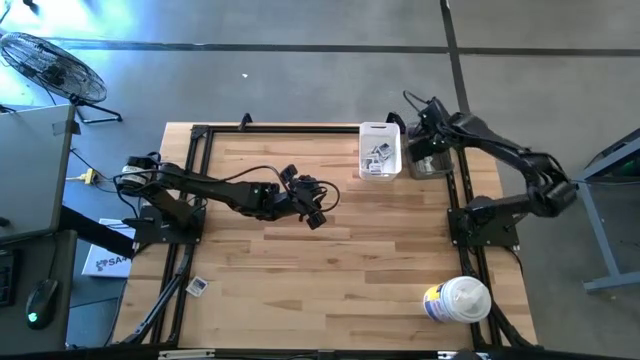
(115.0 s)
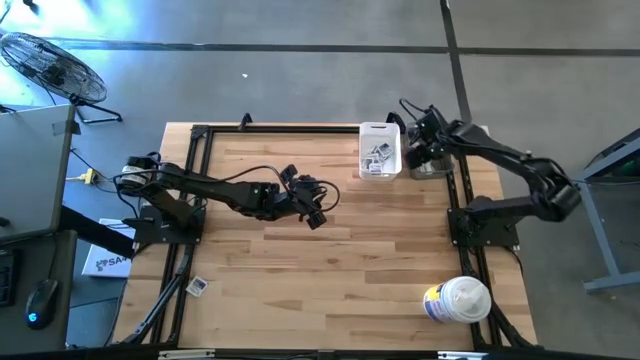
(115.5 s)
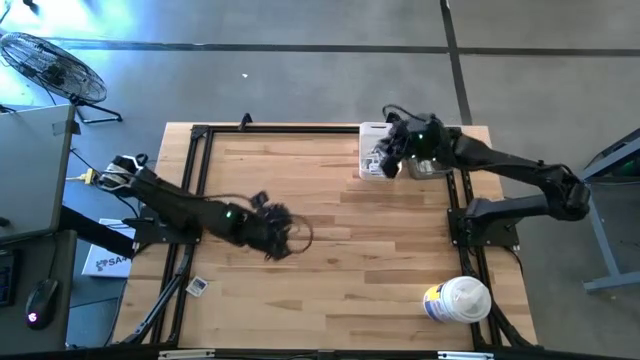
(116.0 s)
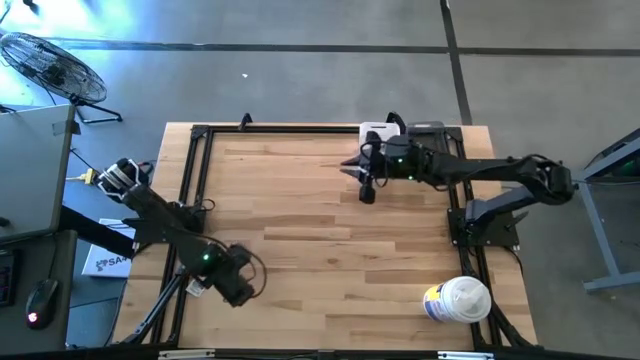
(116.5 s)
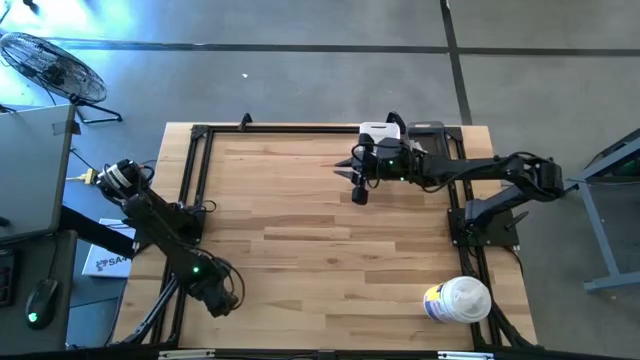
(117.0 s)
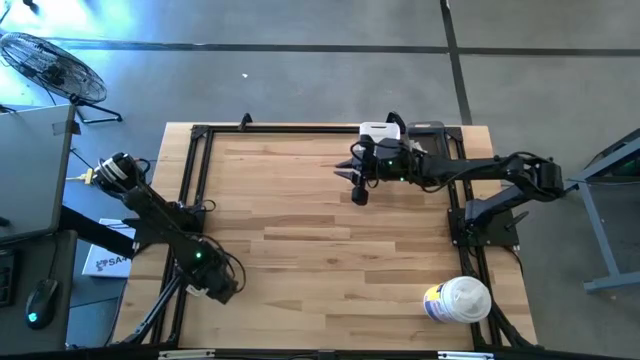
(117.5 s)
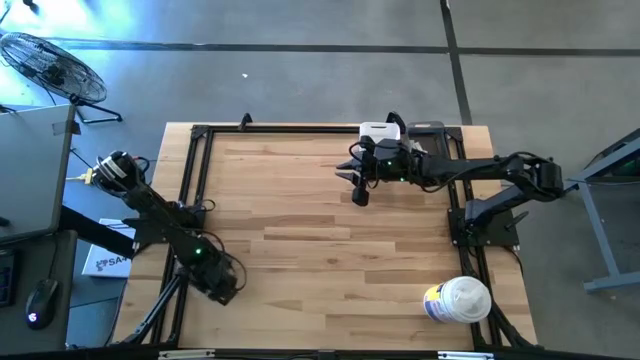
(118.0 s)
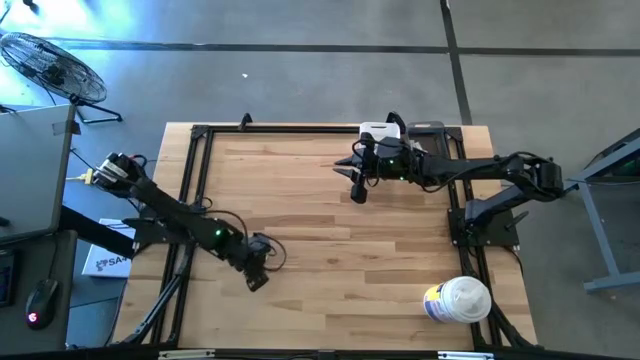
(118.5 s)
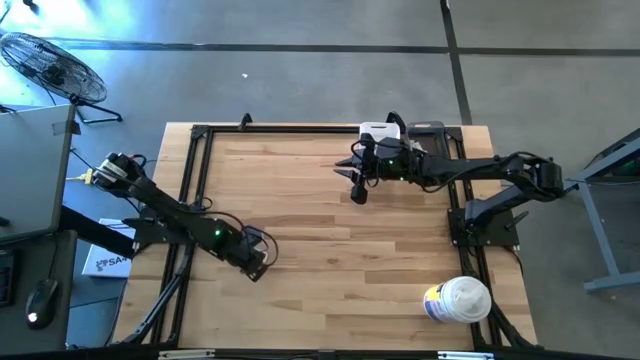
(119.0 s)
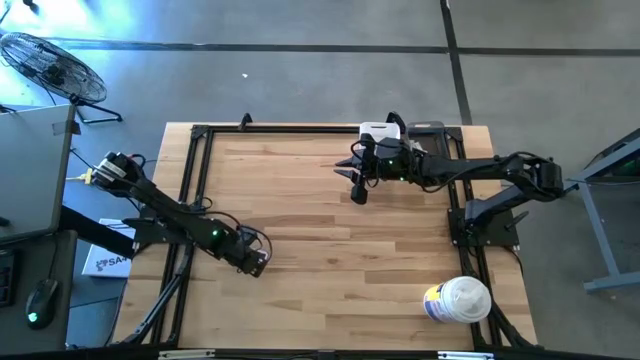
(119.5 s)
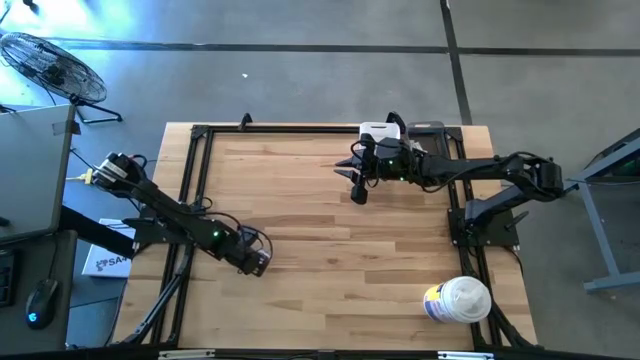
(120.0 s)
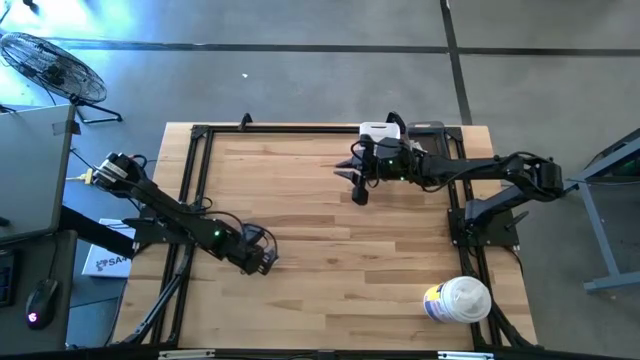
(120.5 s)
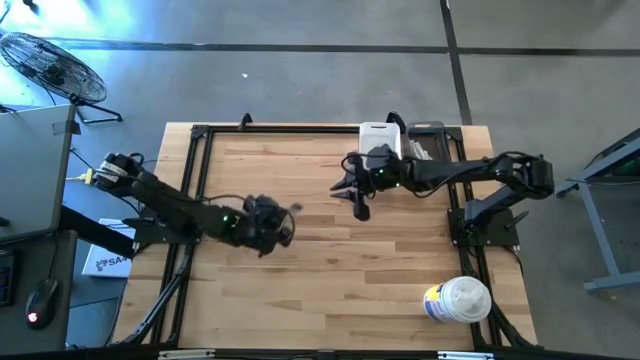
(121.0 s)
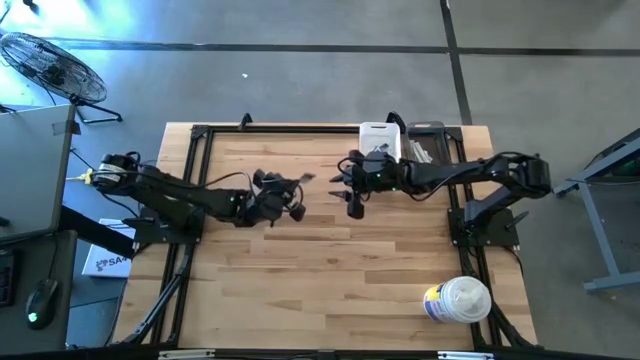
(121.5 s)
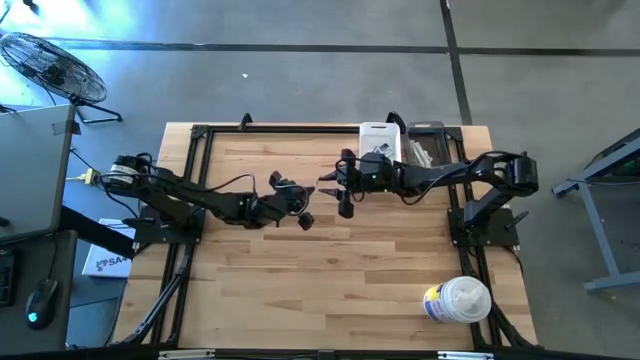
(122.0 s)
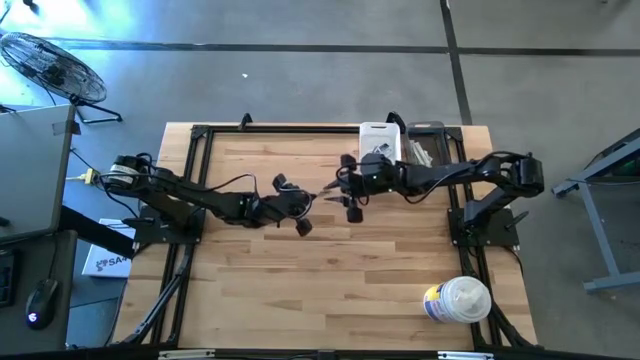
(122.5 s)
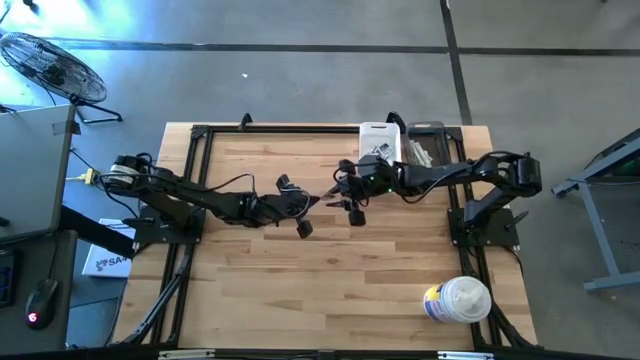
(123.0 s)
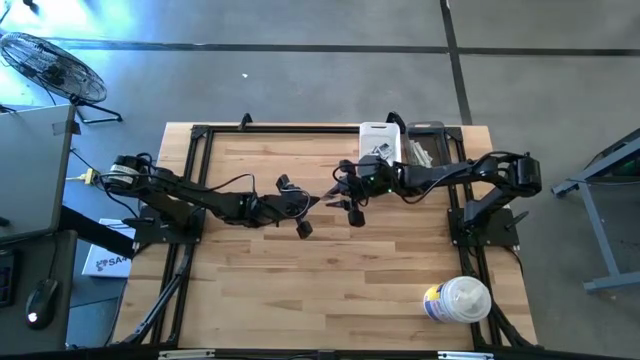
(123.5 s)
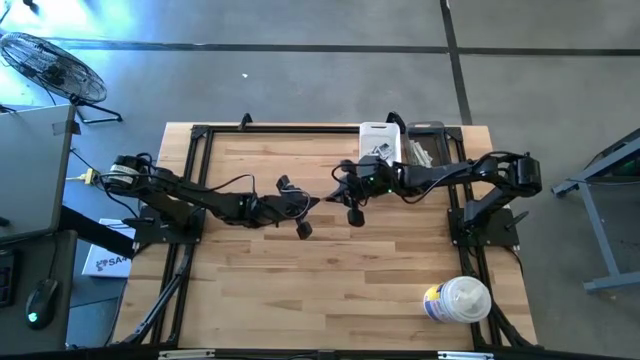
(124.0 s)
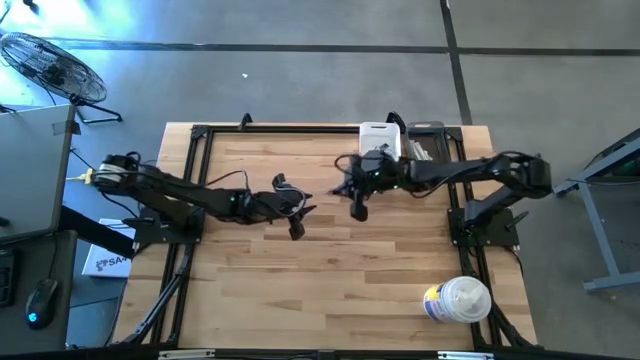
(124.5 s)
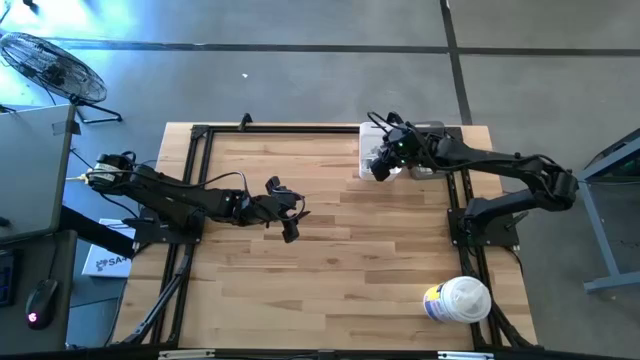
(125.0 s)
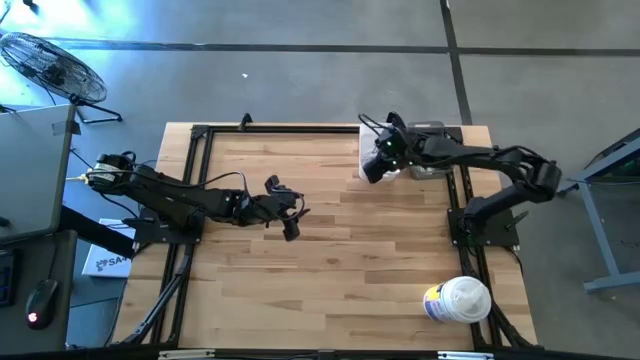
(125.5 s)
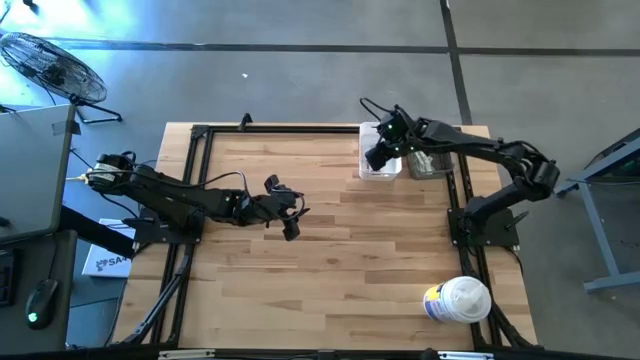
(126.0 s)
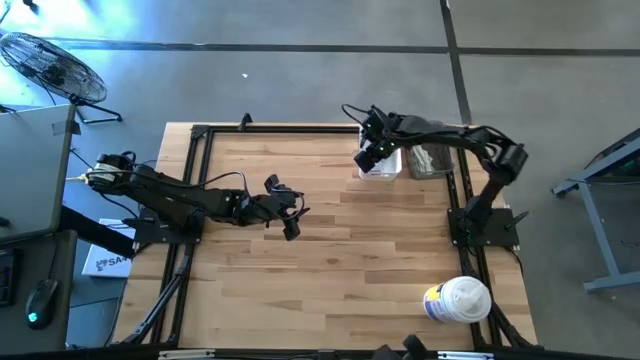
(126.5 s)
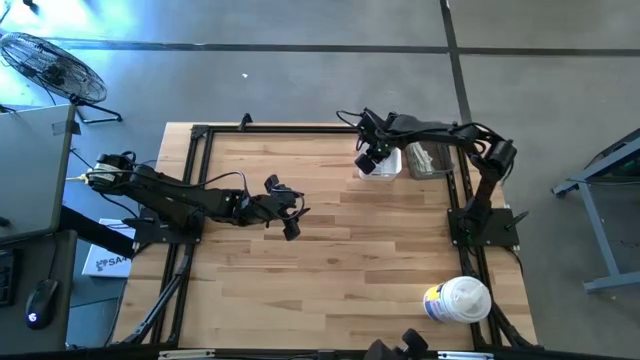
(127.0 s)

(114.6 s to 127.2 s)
Task: Pick & Place First Aid Supplies
Put the alcohol pad into the white bin

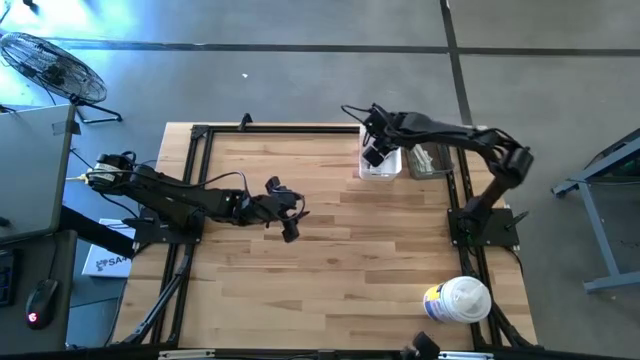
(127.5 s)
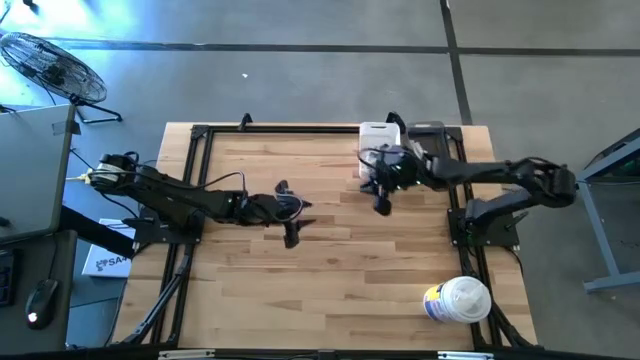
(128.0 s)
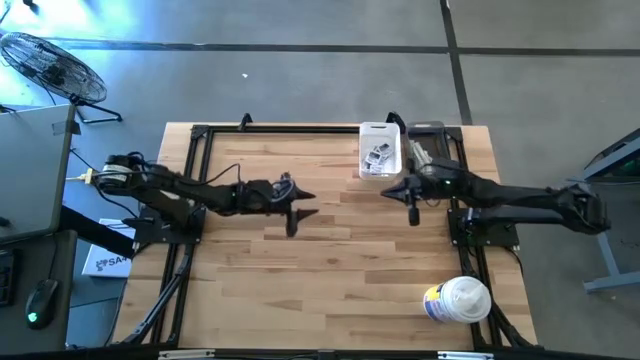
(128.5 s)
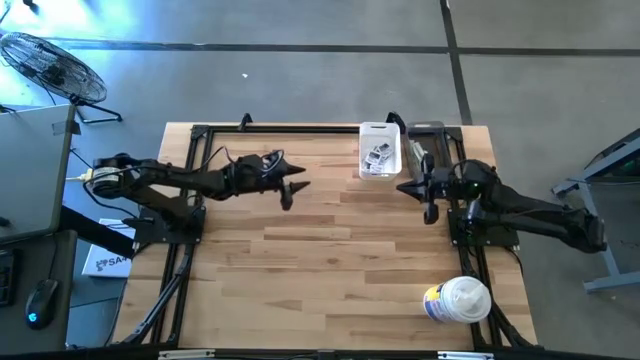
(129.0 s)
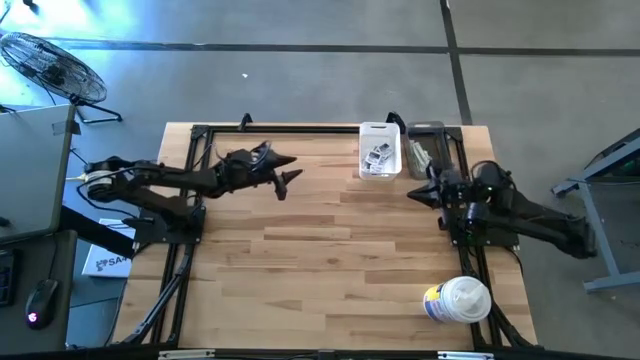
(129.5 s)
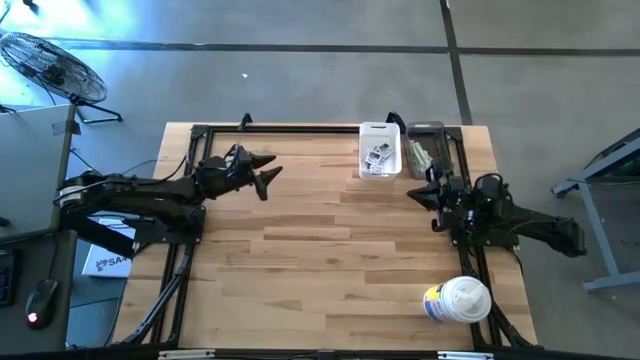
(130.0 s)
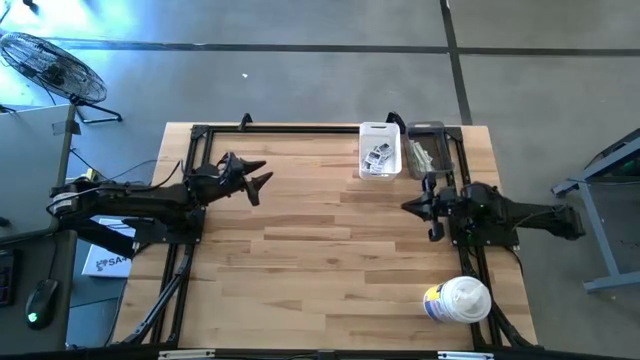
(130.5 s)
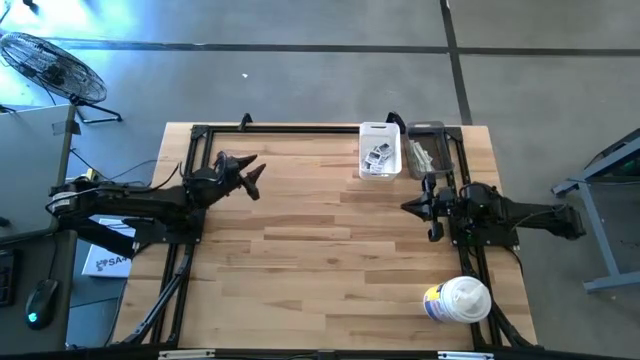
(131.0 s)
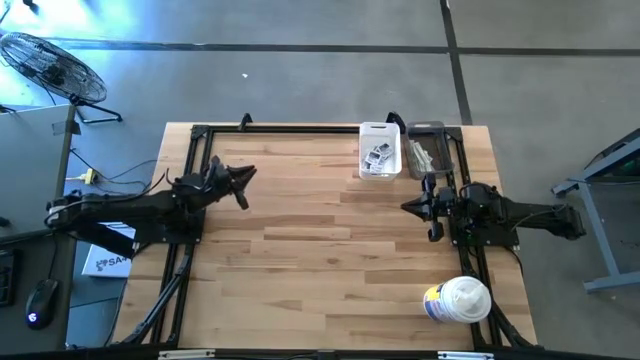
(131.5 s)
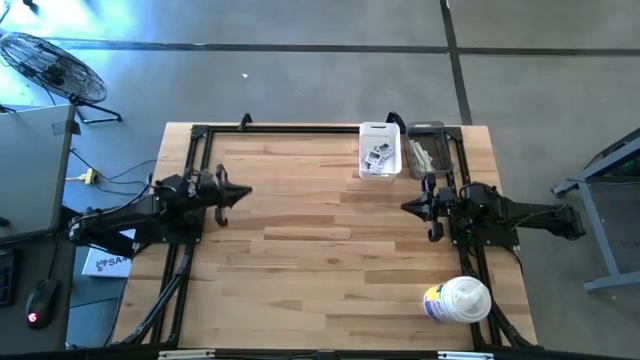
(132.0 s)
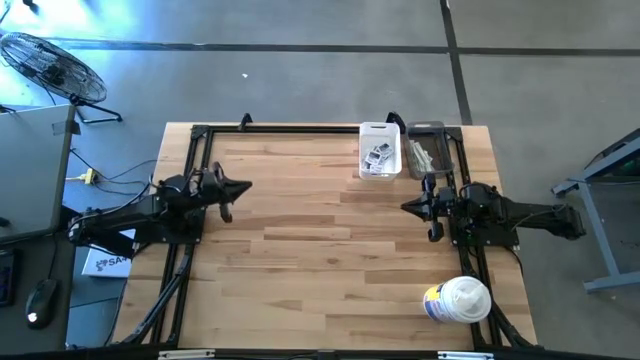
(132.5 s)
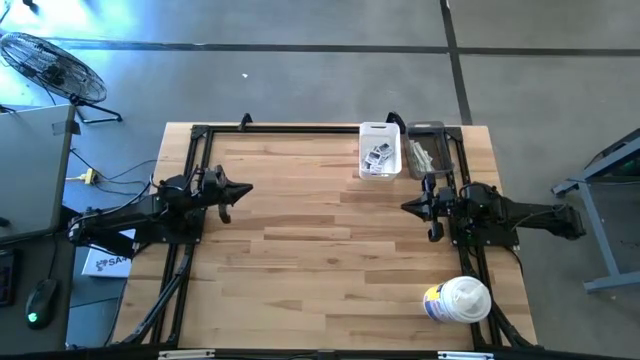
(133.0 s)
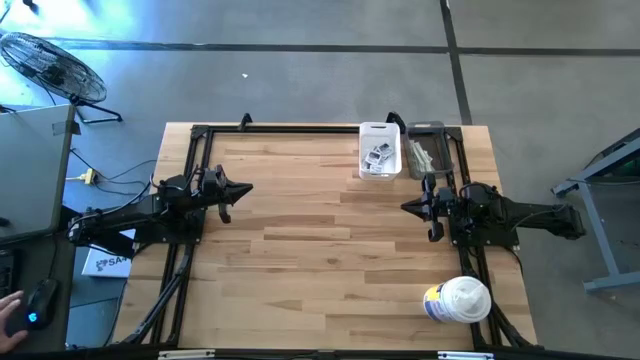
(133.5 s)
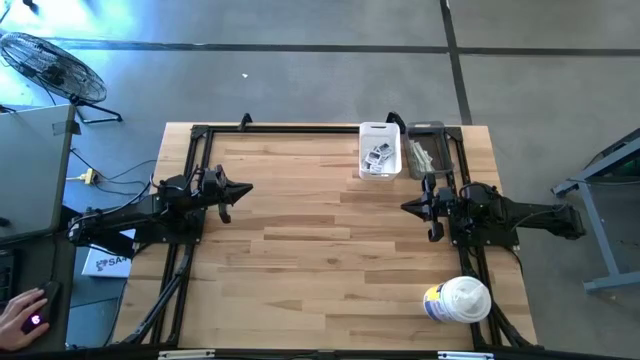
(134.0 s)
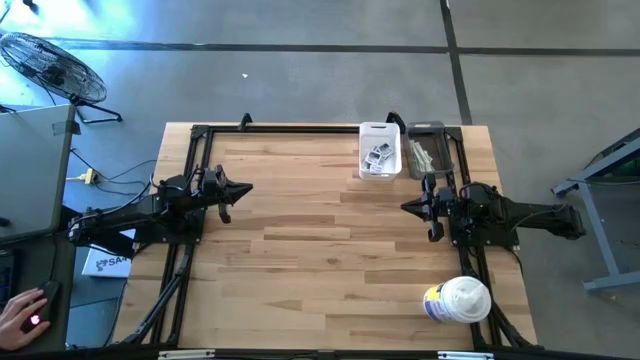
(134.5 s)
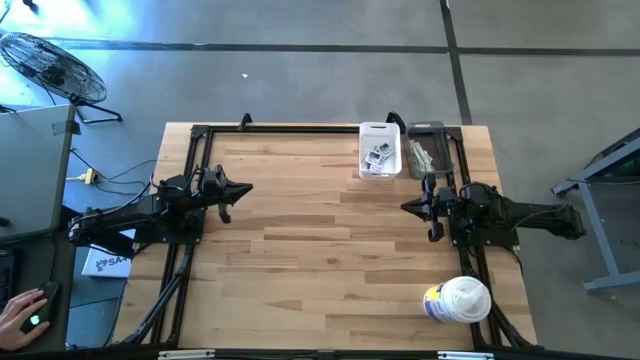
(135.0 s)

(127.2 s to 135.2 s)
Return to Home Position

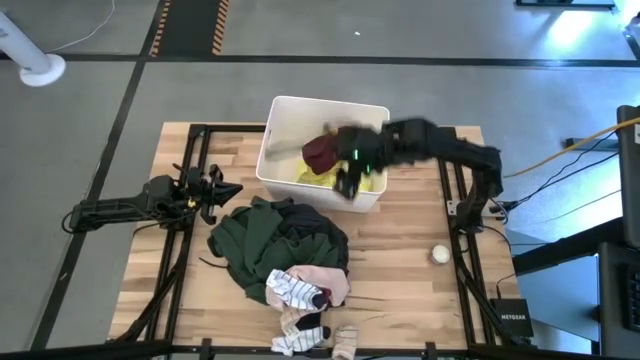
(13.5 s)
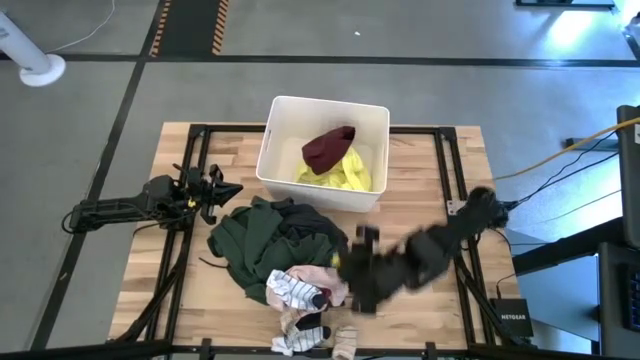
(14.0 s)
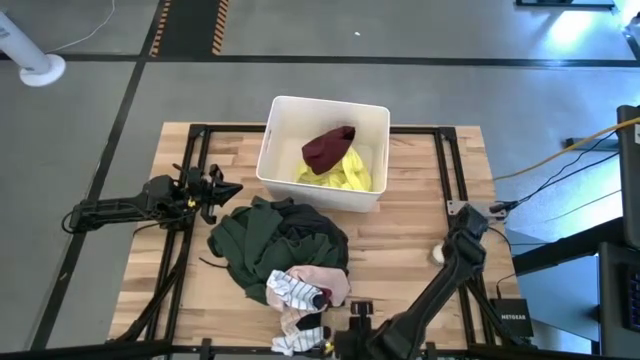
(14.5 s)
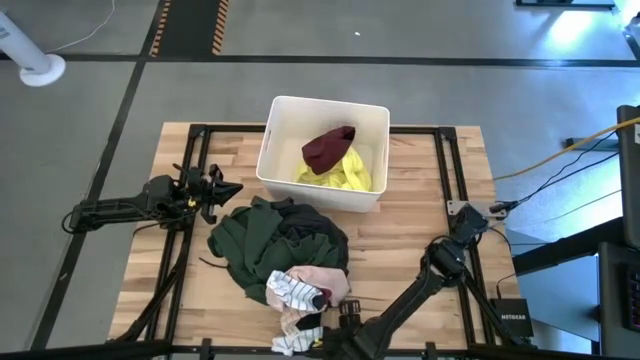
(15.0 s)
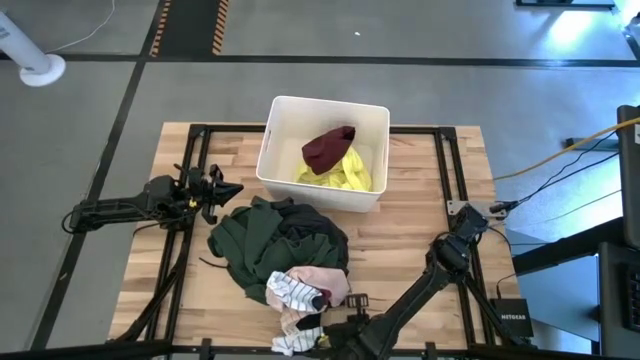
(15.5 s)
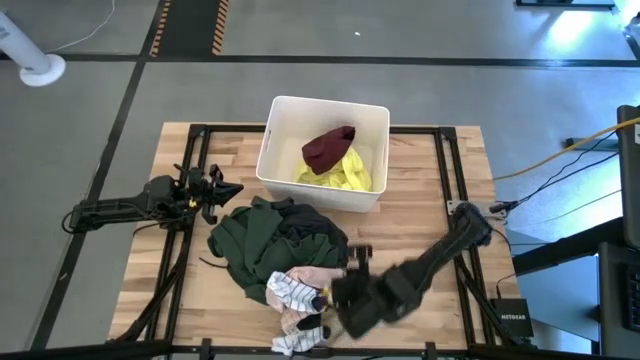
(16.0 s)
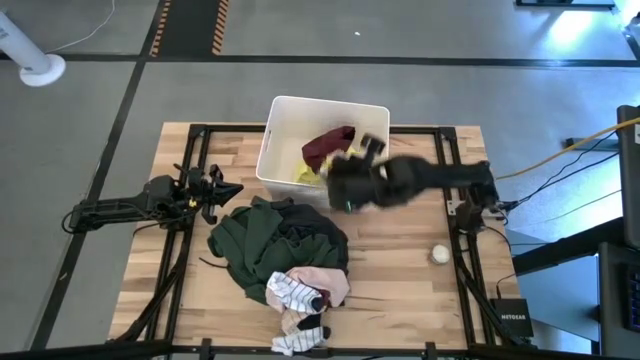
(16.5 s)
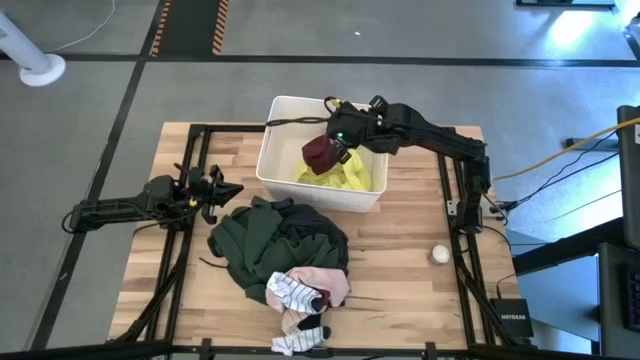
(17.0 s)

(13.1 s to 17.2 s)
Task: Sort clothes
Put the bottom pink stripe sock into the white bin
